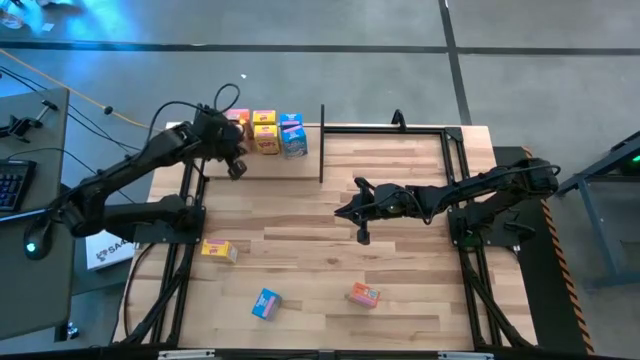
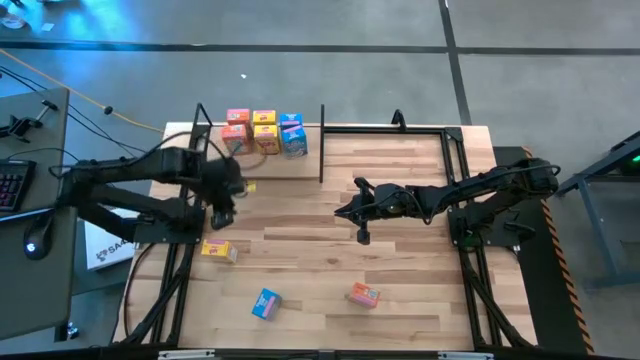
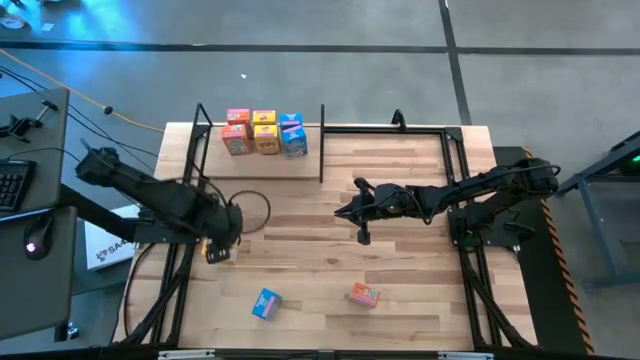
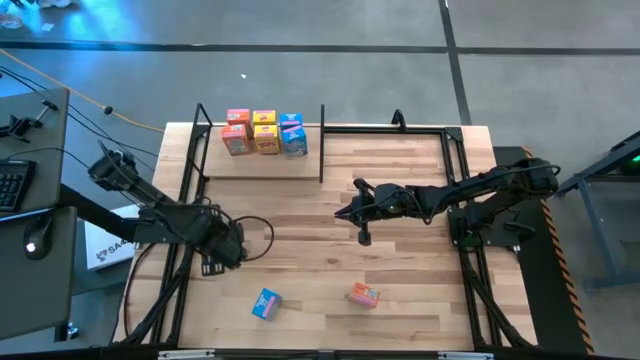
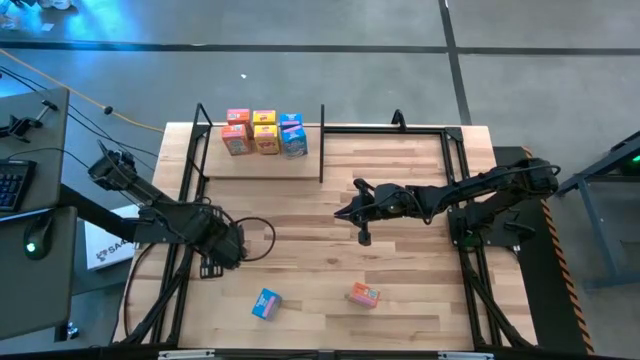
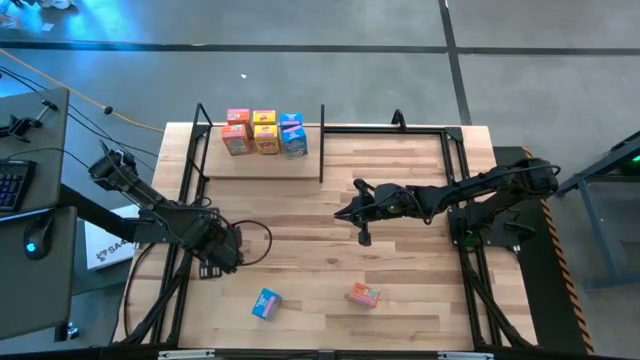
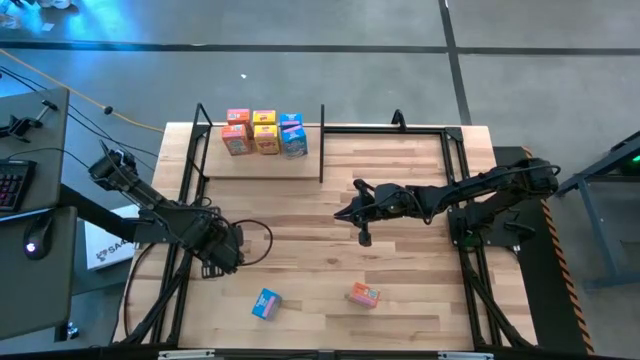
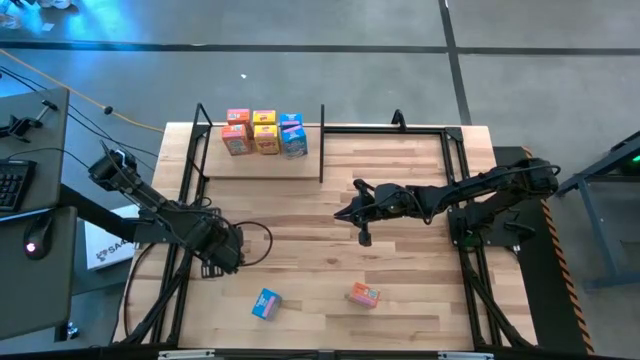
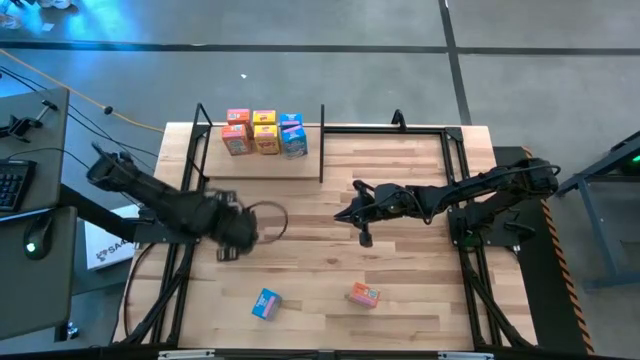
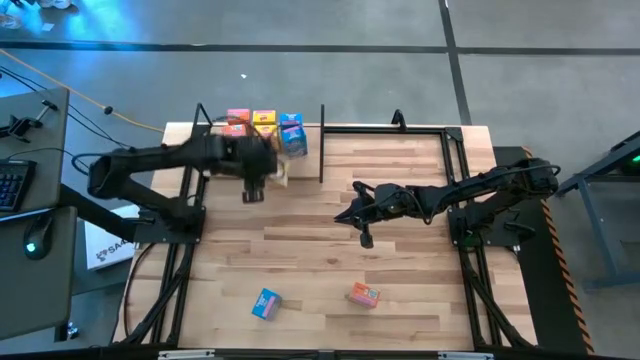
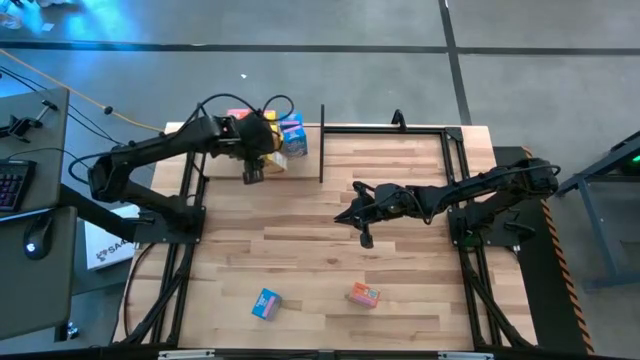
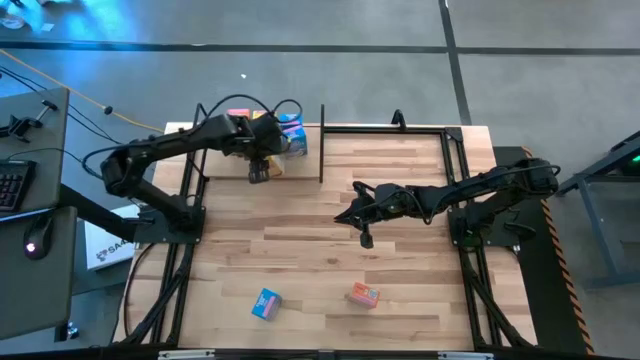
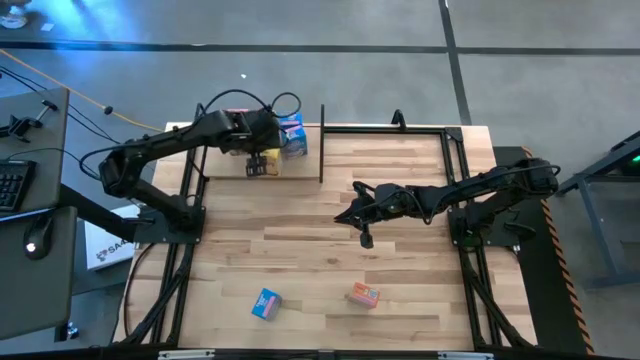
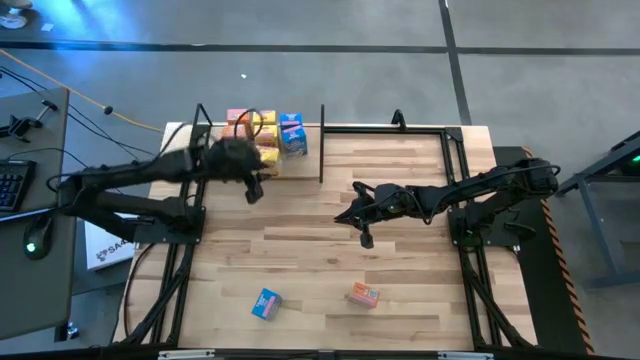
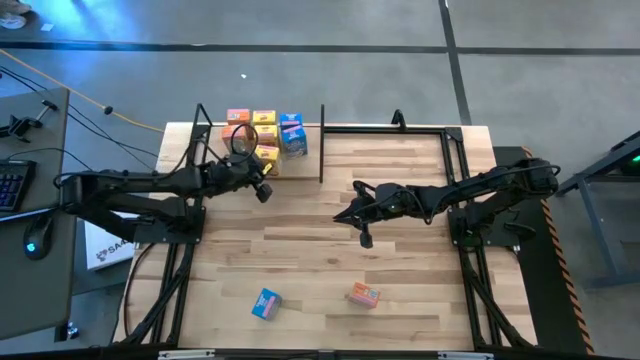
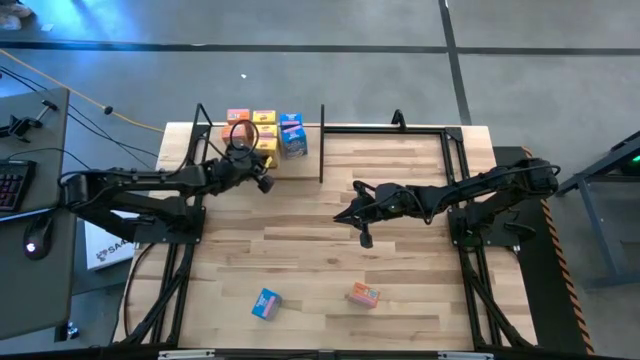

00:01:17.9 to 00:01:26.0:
Task: Stack cereal on shelf
Put the yellow cereal box on the shelf aligned with the other yellow cereal box

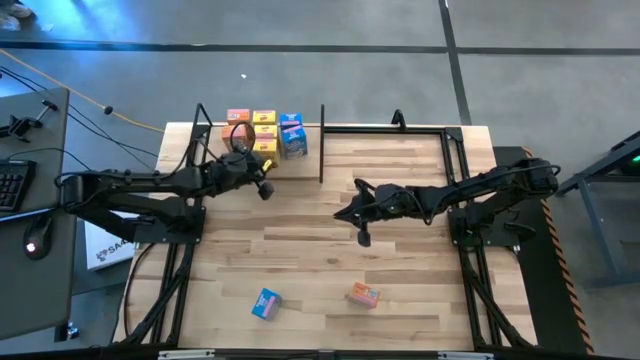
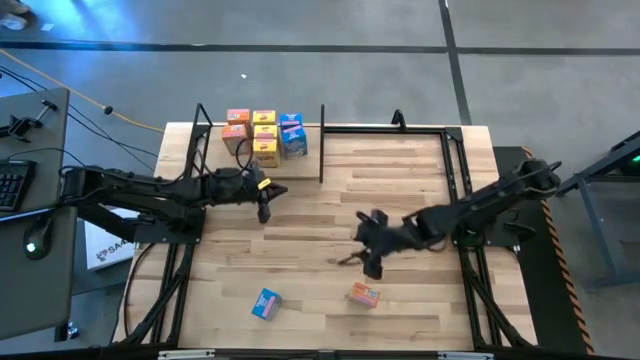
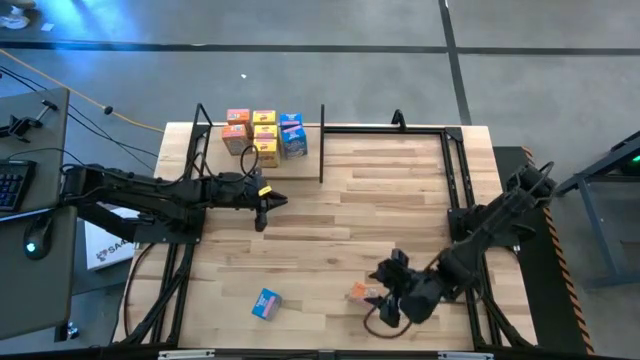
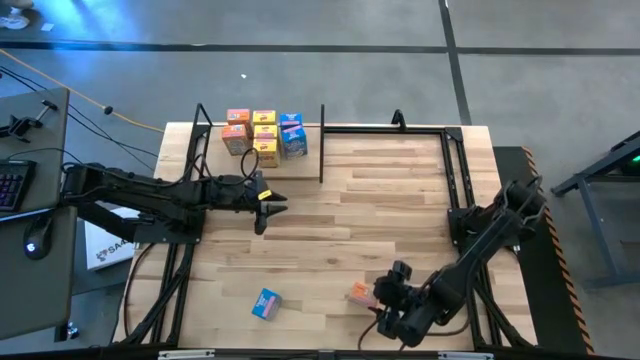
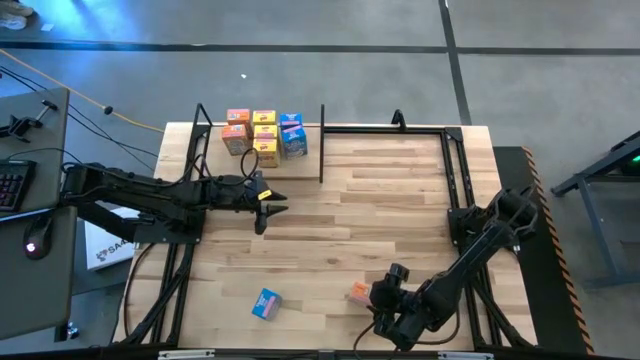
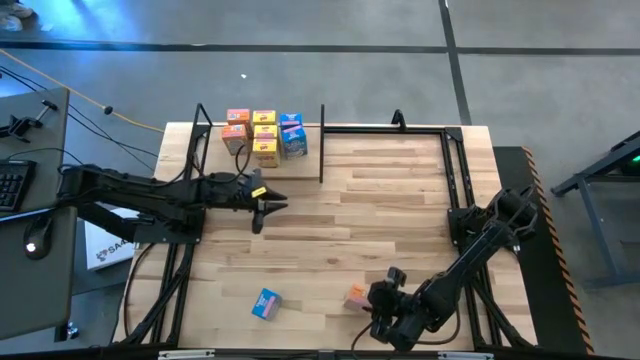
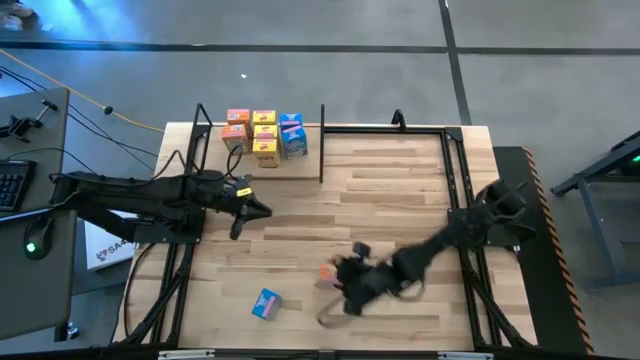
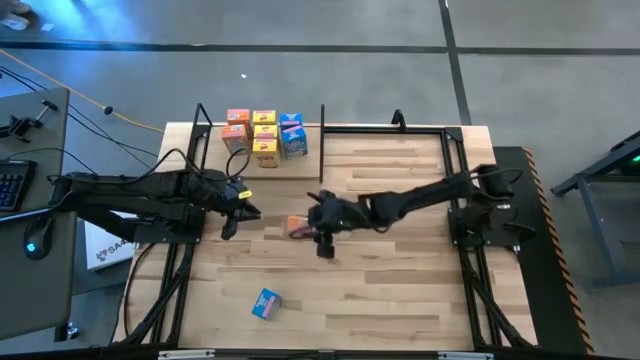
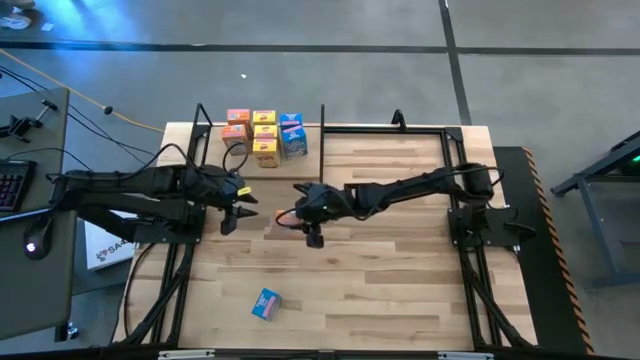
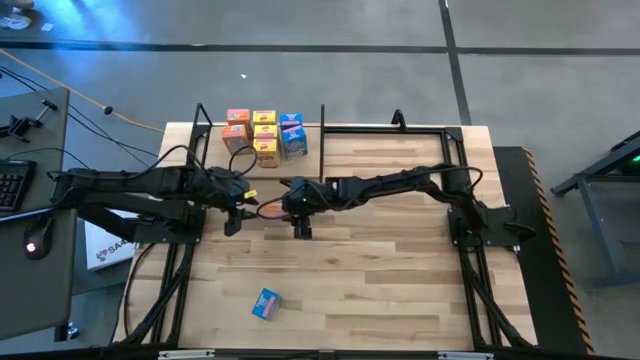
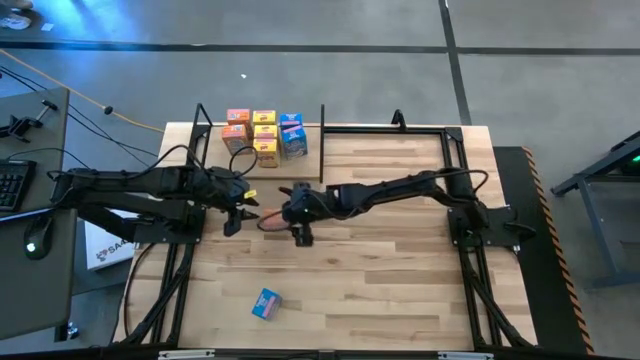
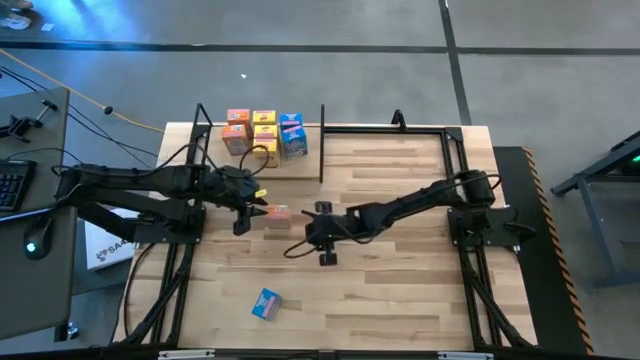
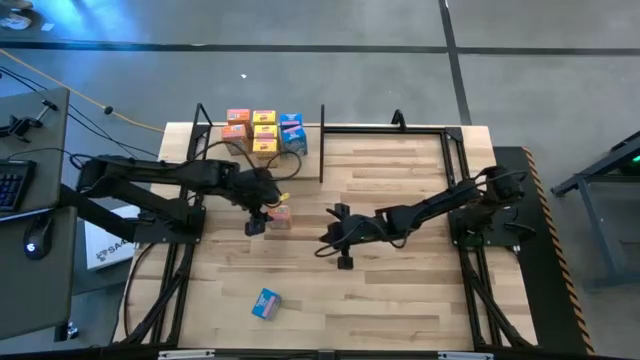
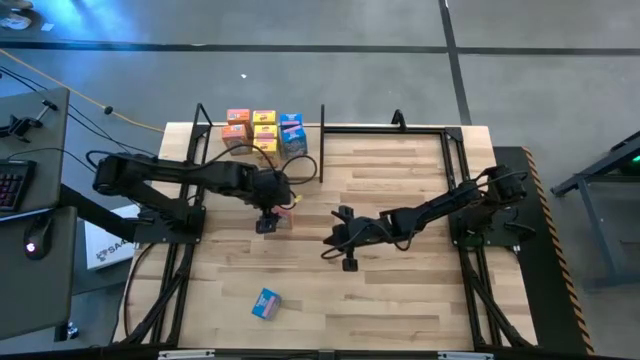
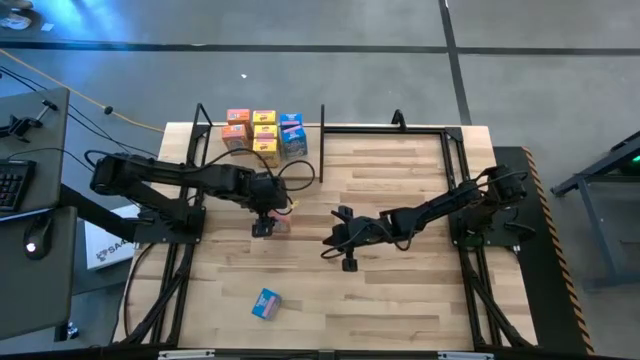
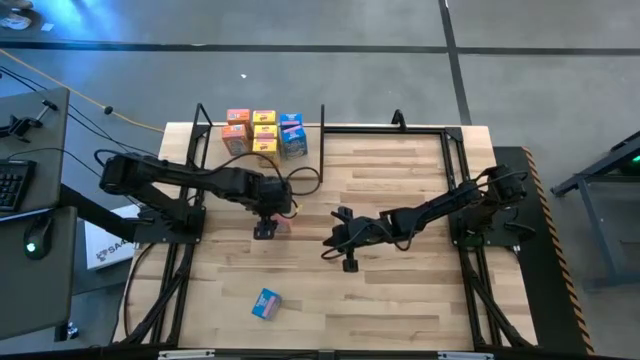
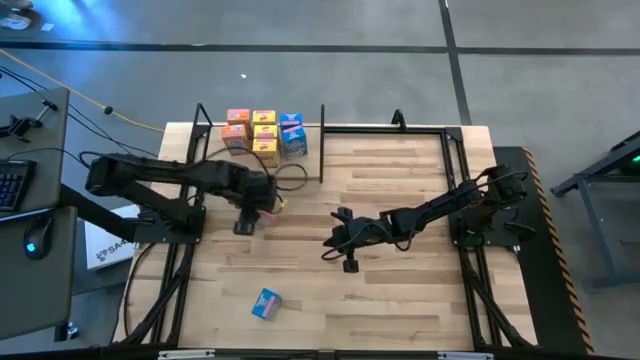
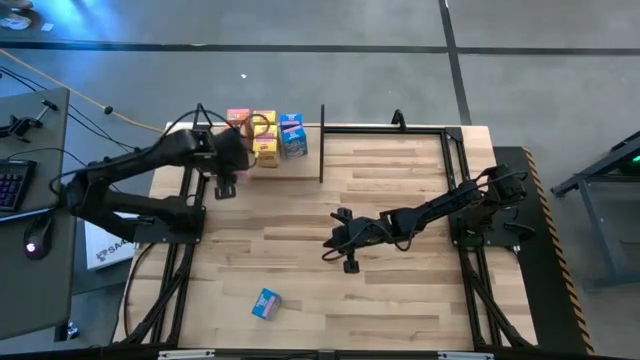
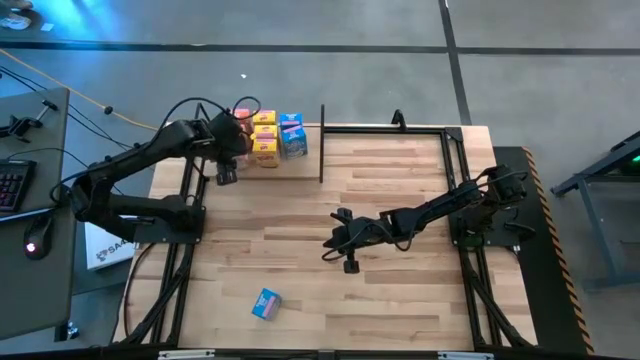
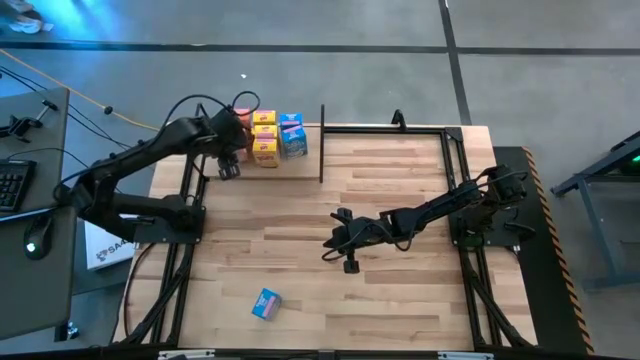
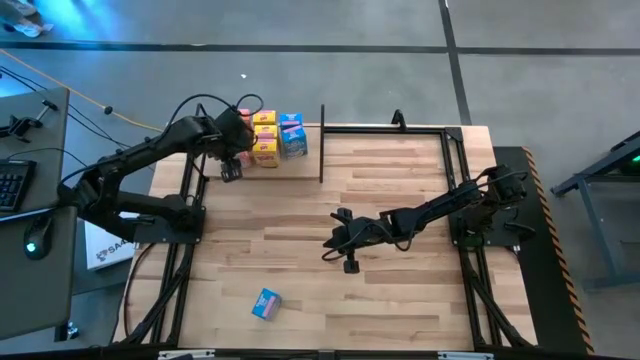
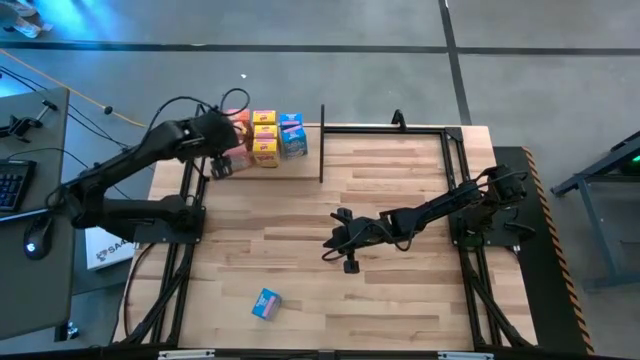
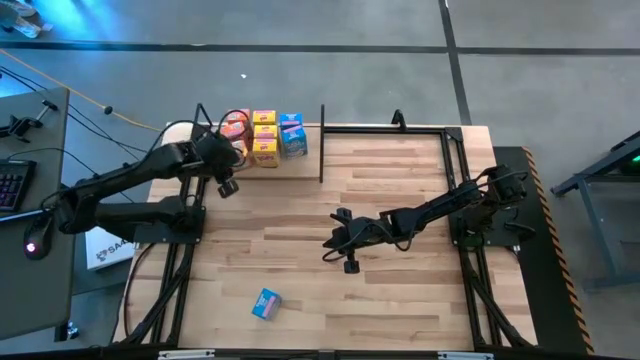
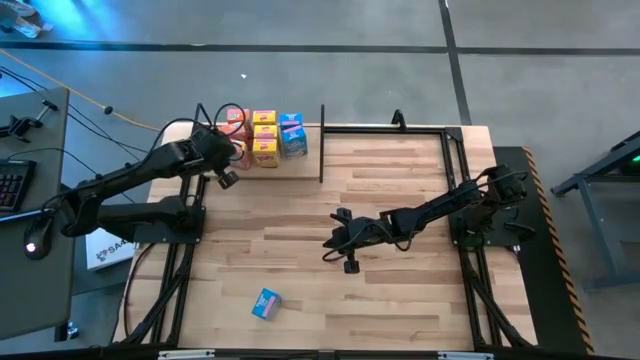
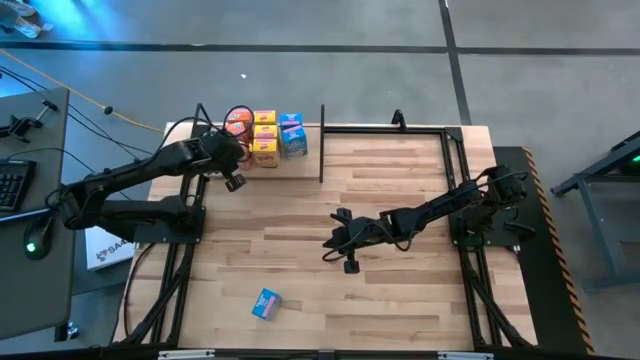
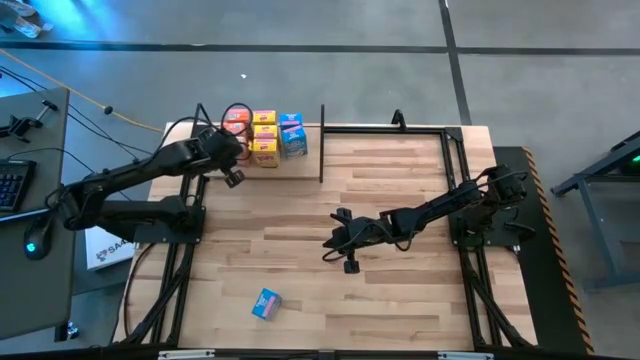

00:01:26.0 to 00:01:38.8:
Put the orange cereal box on the shelf aligned with the other orange cereal box
